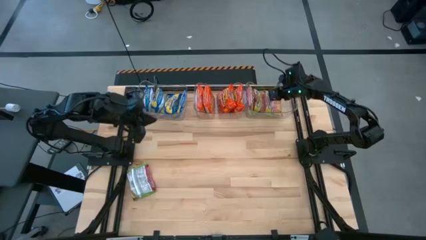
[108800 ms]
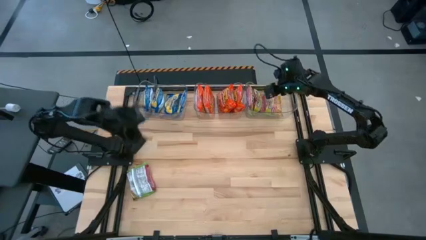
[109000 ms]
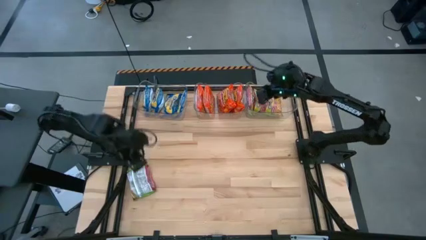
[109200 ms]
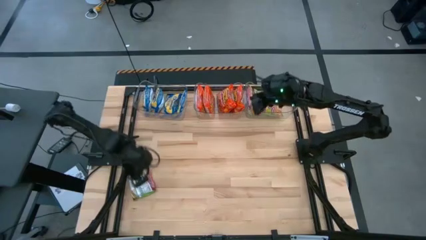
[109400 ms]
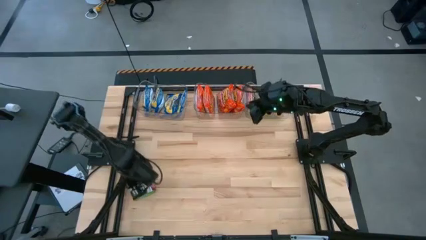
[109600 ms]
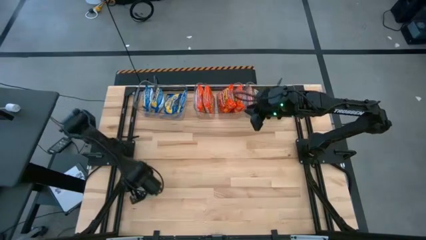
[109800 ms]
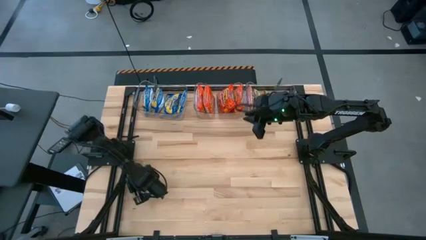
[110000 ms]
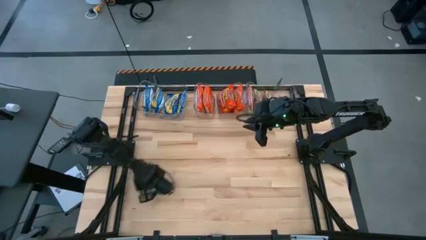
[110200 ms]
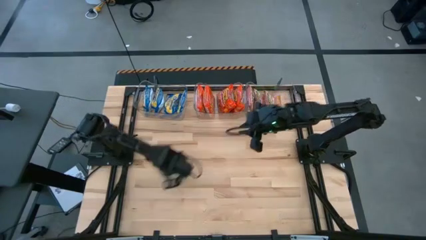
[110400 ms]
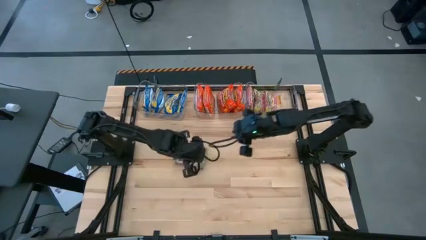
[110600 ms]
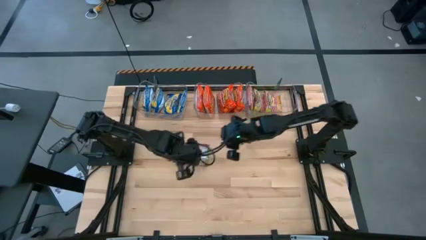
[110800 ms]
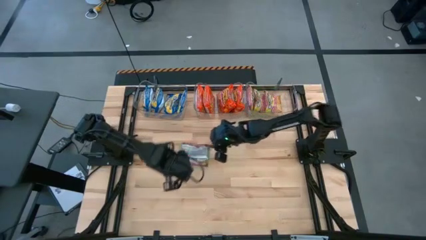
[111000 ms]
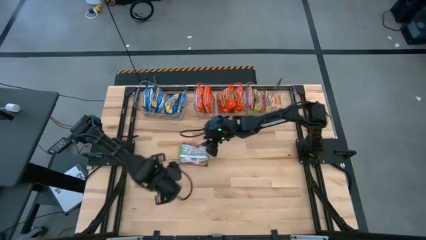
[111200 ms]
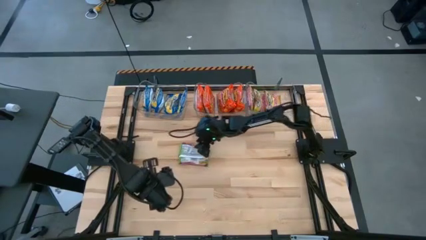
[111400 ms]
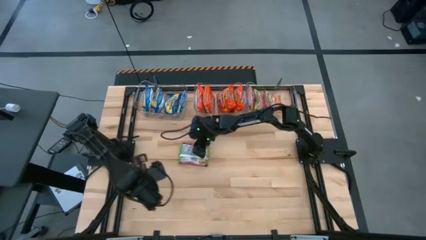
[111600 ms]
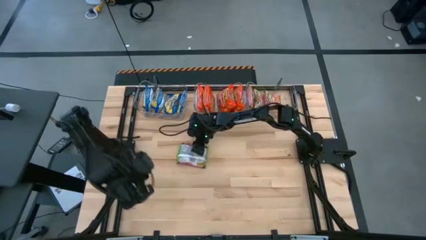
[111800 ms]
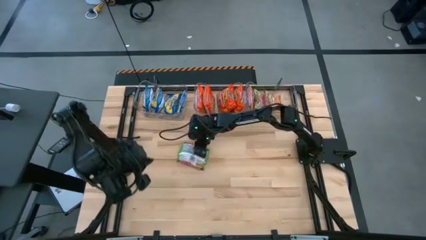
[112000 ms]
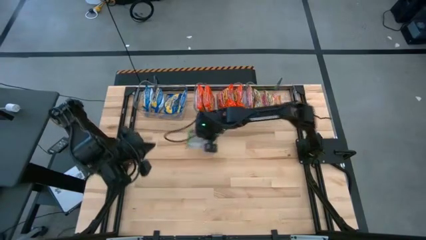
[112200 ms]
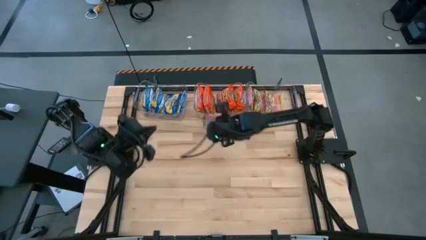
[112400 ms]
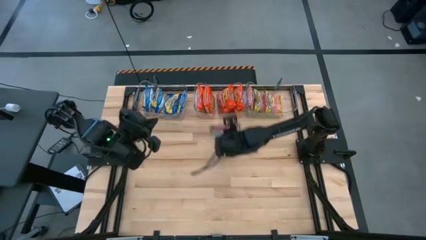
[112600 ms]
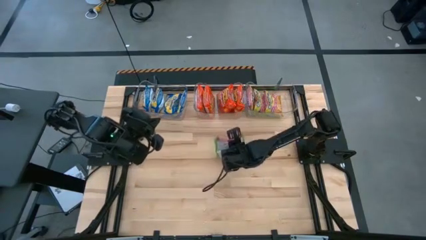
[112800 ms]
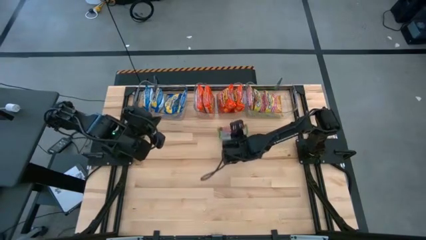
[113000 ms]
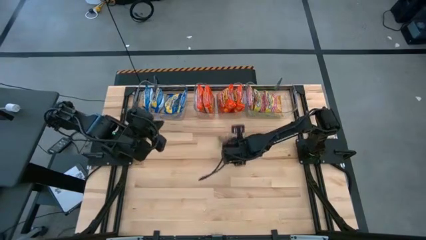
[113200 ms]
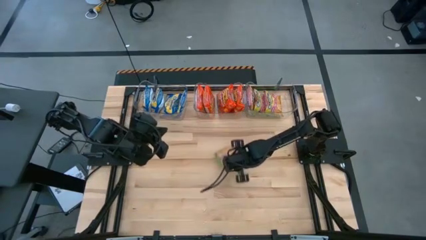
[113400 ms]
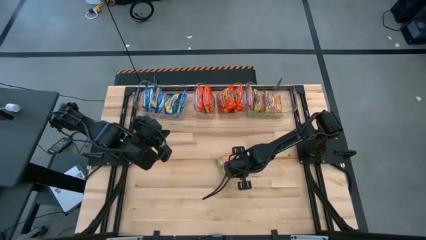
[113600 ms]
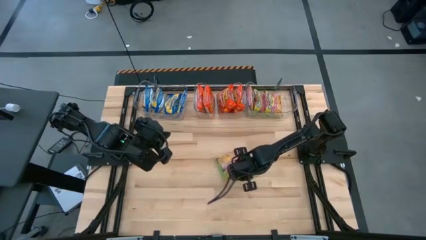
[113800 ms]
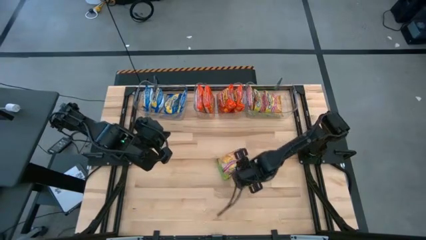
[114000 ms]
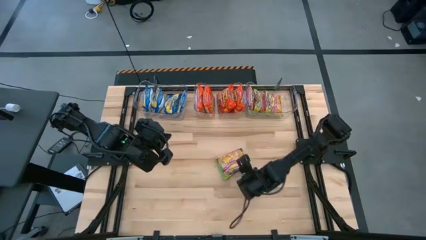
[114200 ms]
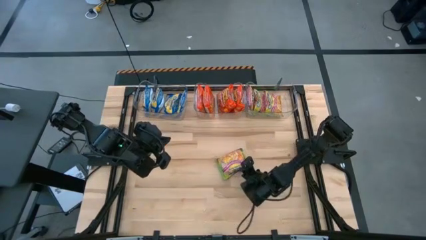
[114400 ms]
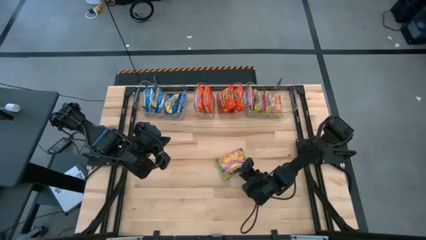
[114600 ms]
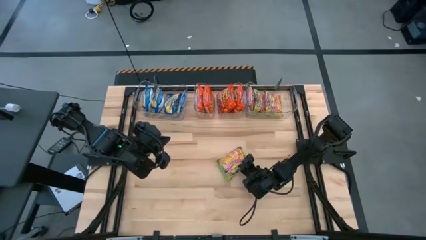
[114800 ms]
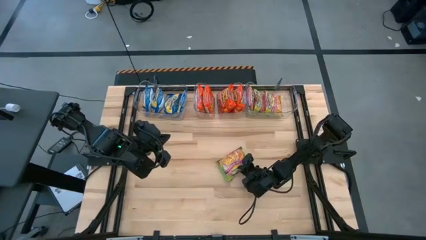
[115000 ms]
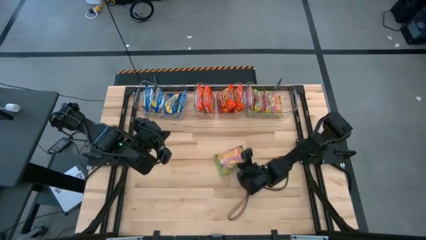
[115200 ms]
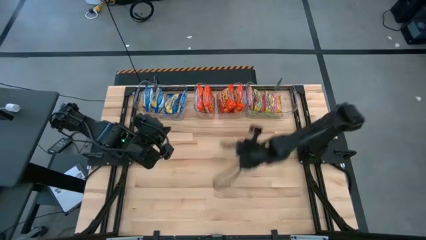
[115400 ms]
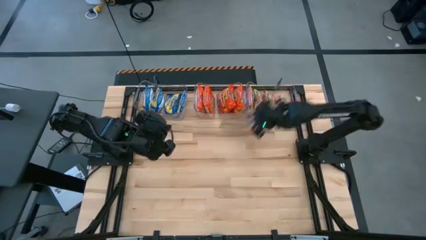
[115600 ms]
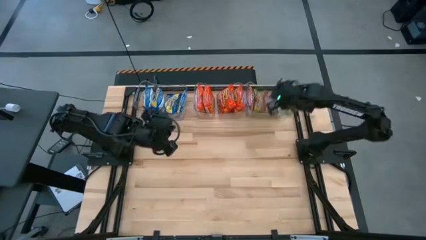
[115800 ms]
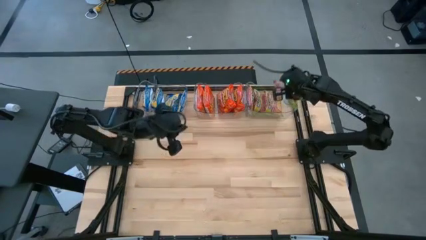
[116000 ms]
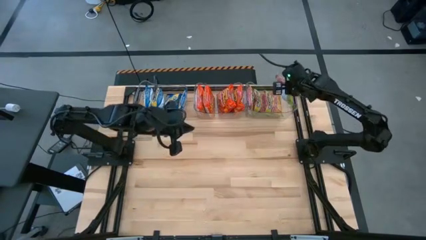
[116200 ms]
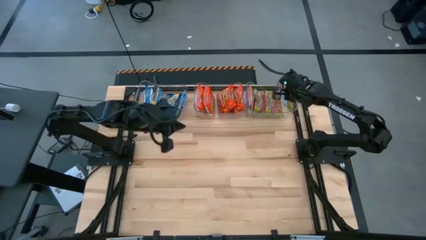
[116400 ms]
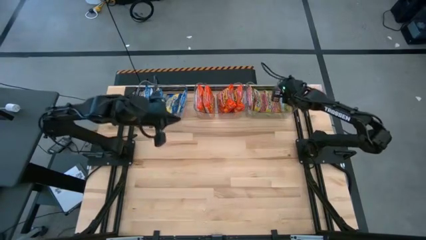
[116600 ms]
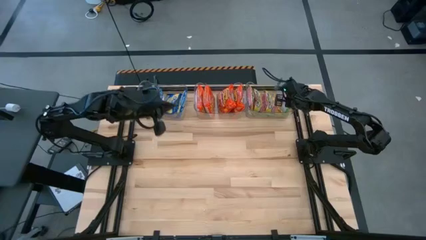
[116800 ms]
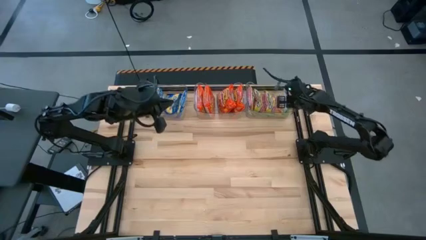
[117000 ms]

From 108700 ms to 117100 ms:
Task: Sort Maruchan noodles
Put the green noodle pack into the right transparent bin

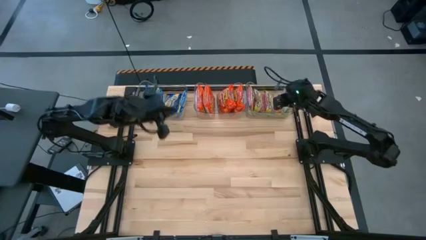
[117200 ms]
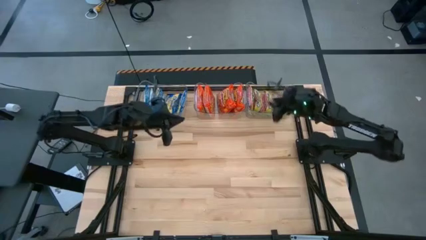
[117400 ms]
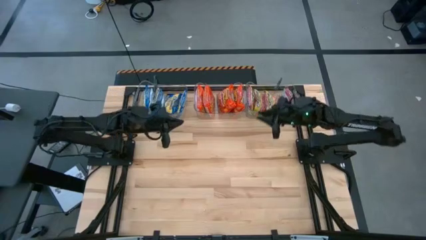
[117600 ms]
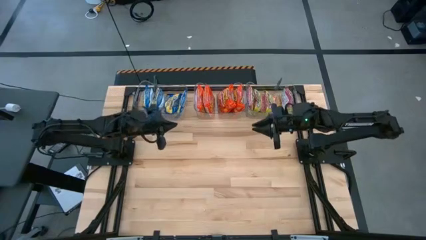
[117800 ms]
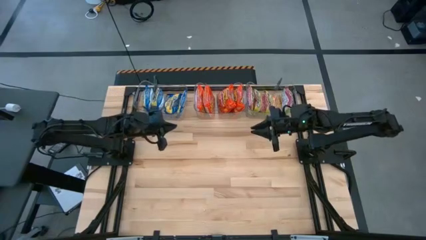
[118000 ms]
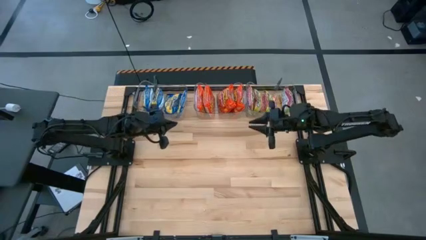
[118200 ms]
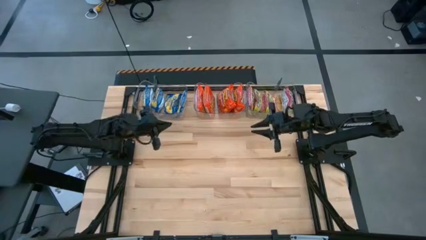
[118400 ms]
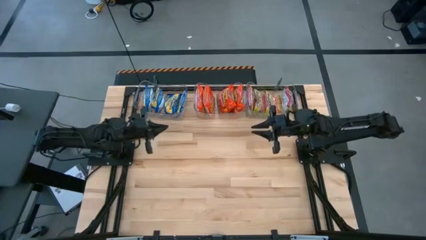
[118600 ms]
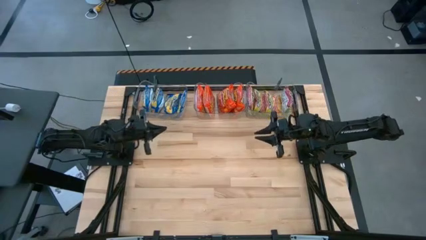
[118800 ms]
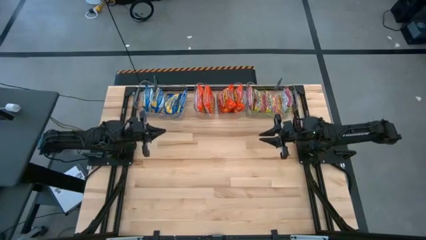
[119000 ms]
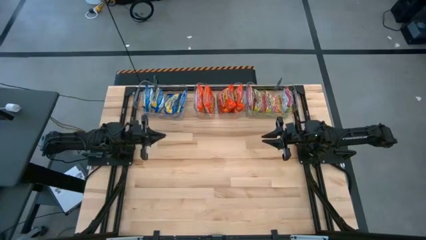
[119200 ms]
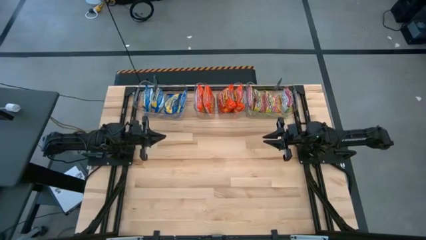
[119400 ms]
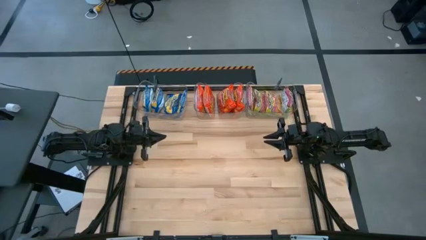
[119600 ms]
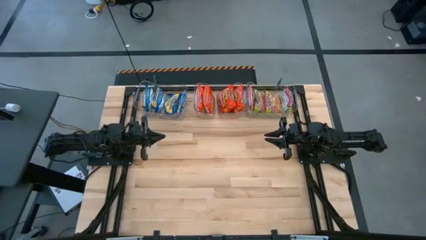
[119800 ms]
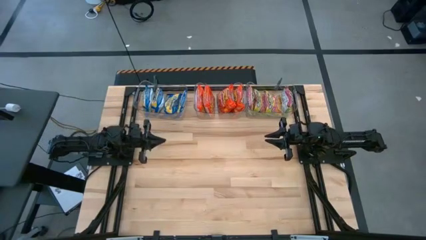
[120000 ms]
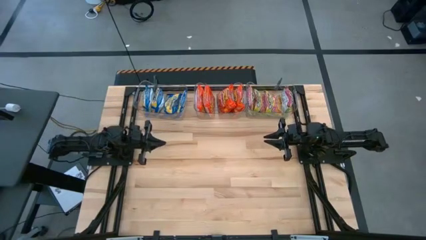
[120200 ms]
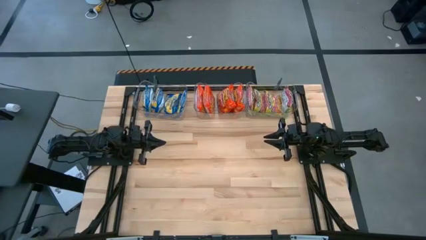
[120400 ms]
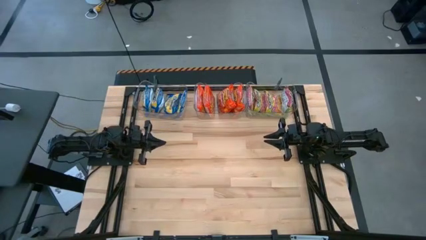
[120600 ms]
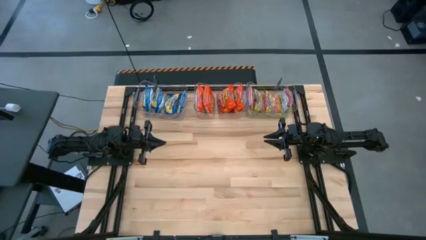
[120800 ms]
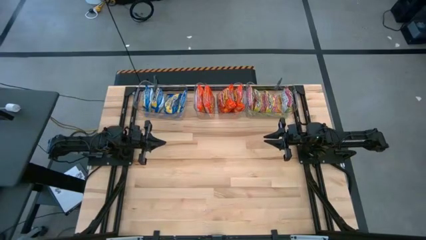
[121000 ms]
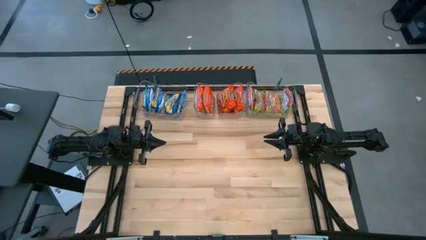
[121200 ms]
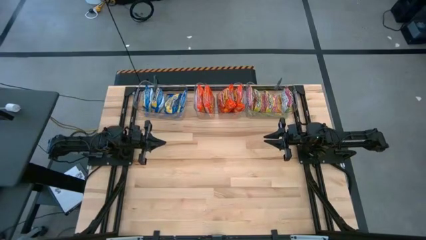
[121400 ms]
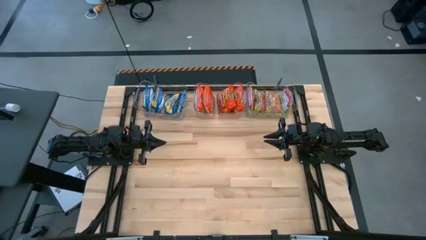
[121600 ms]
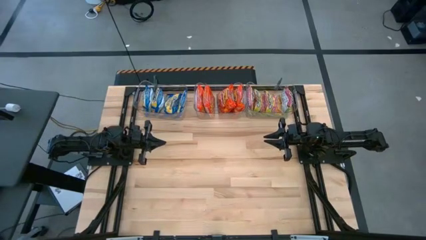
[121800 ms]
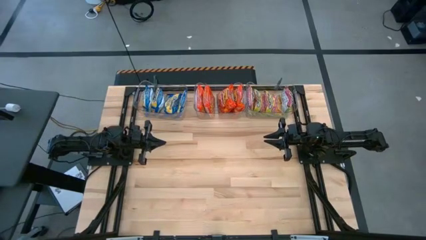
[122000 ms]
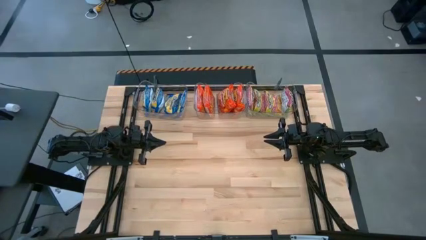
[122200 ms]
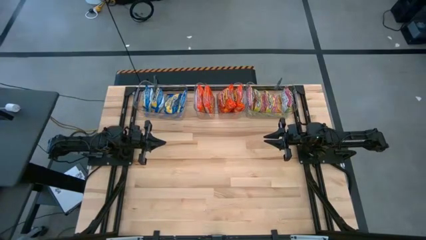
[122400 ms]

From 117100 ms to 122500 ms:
Return to Home Position
